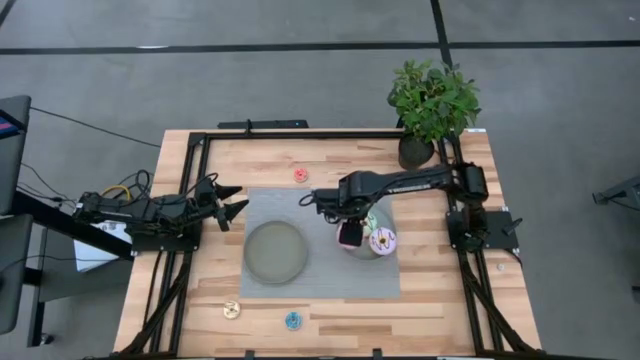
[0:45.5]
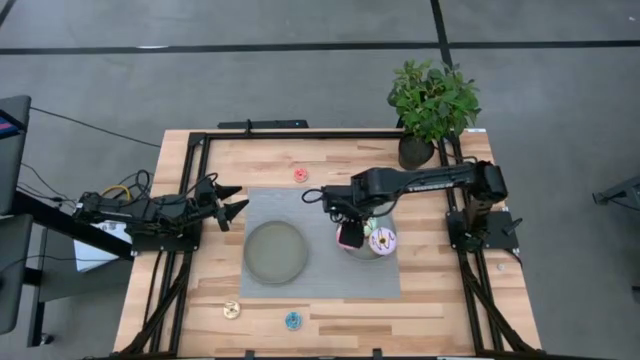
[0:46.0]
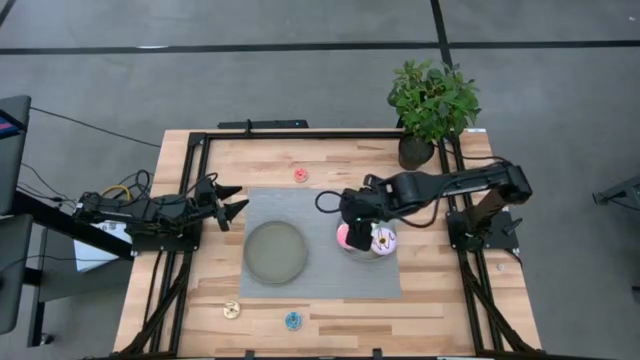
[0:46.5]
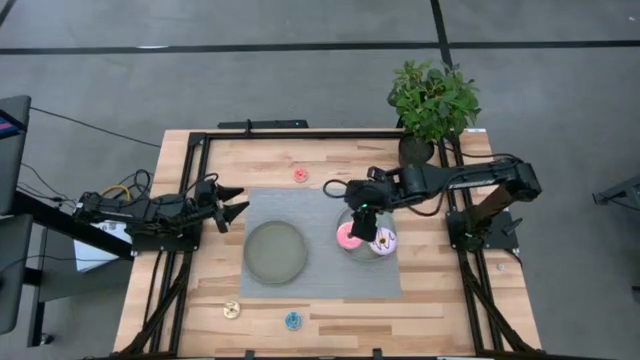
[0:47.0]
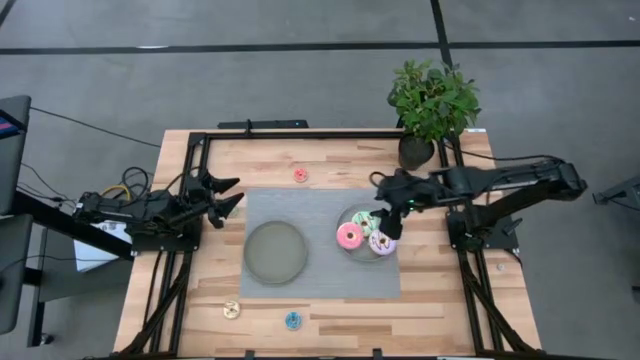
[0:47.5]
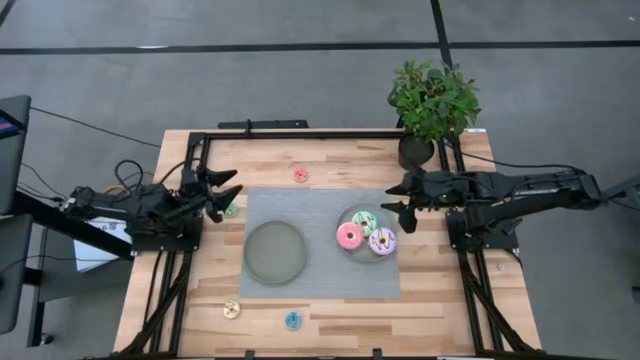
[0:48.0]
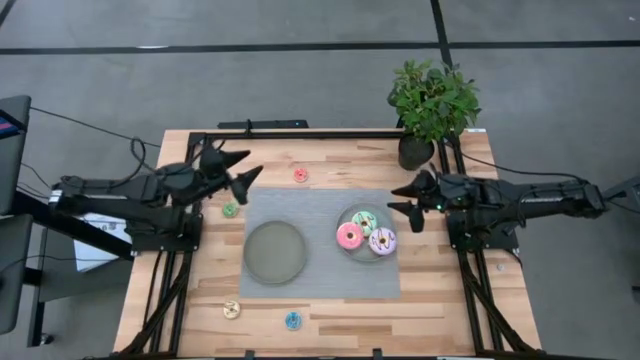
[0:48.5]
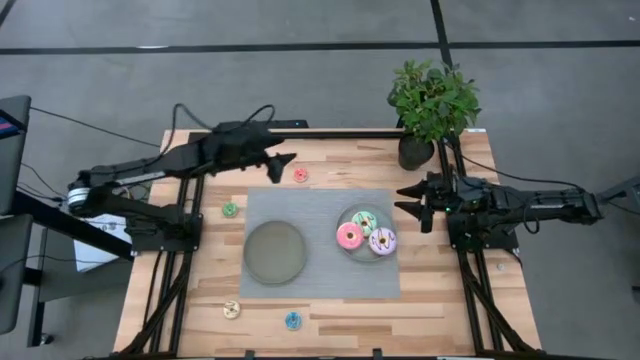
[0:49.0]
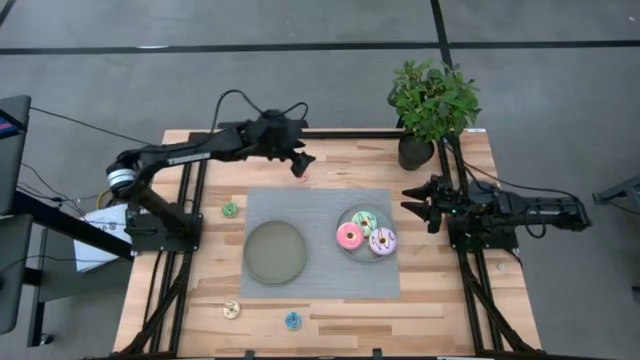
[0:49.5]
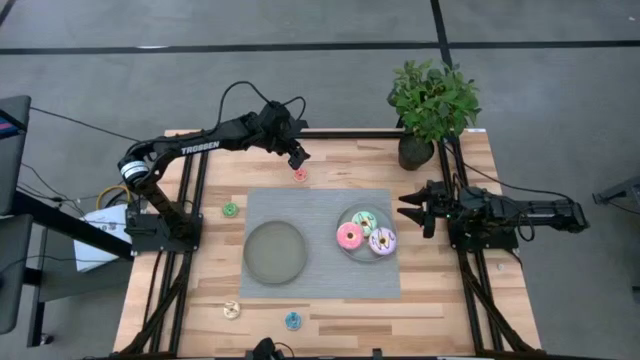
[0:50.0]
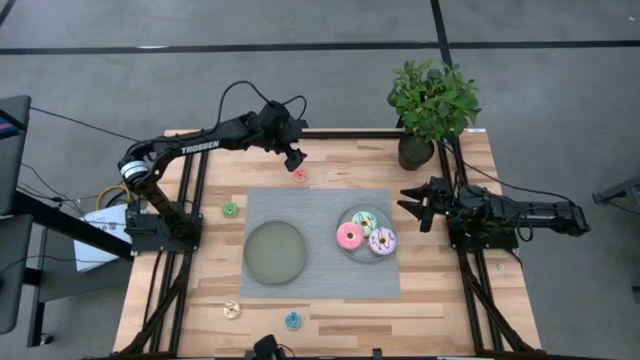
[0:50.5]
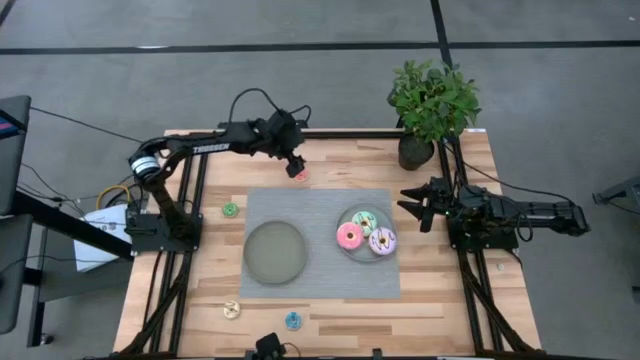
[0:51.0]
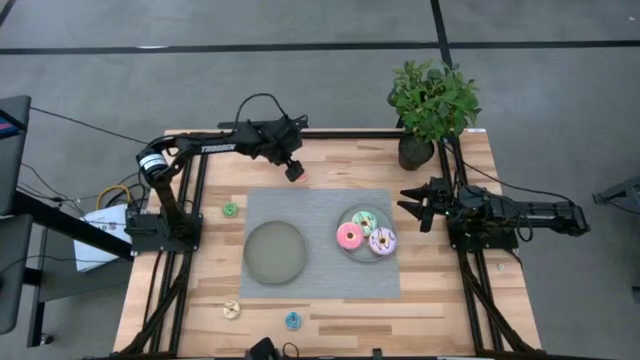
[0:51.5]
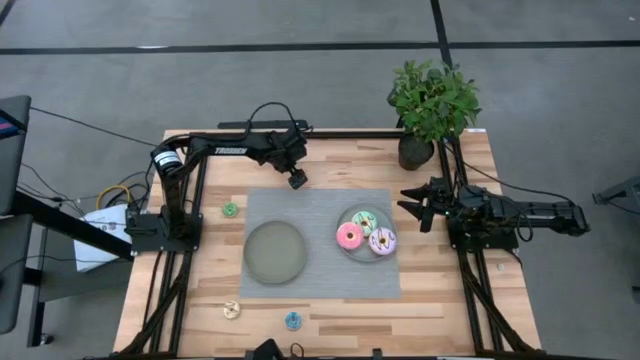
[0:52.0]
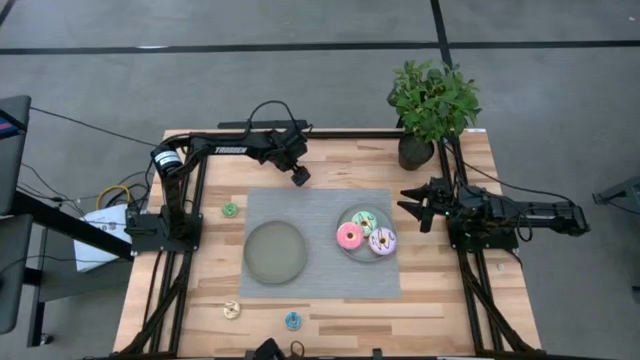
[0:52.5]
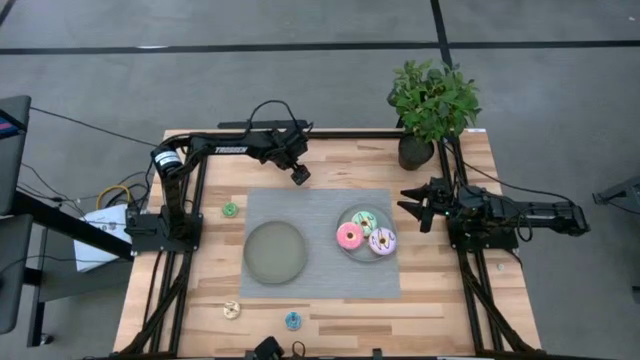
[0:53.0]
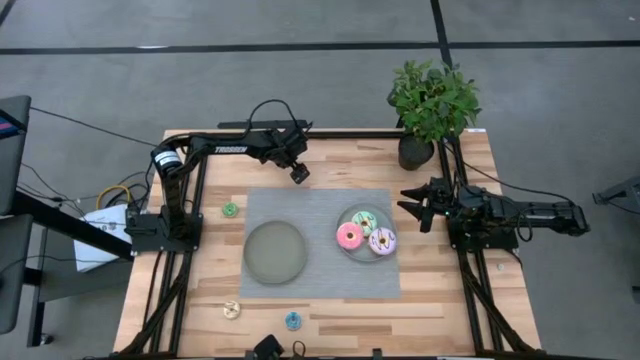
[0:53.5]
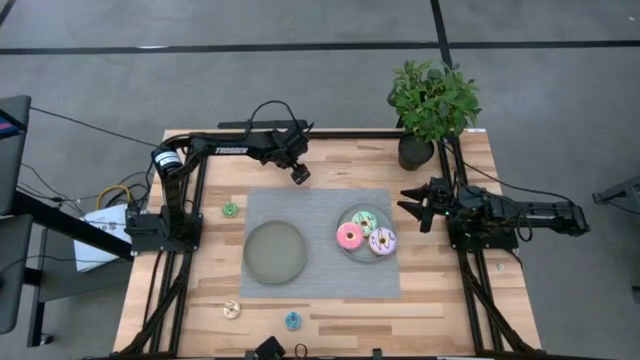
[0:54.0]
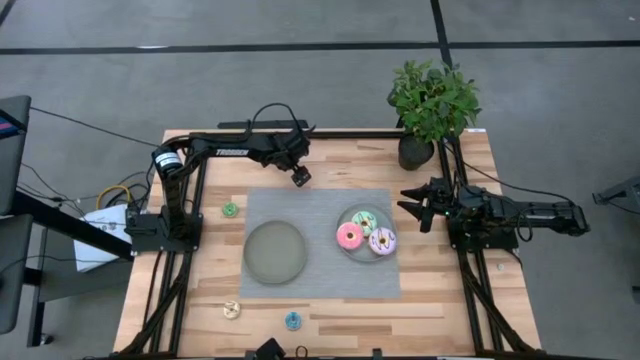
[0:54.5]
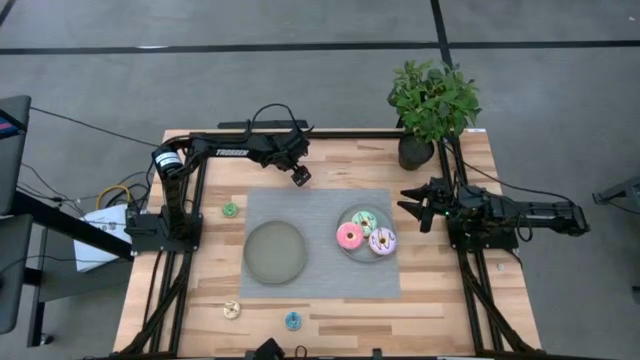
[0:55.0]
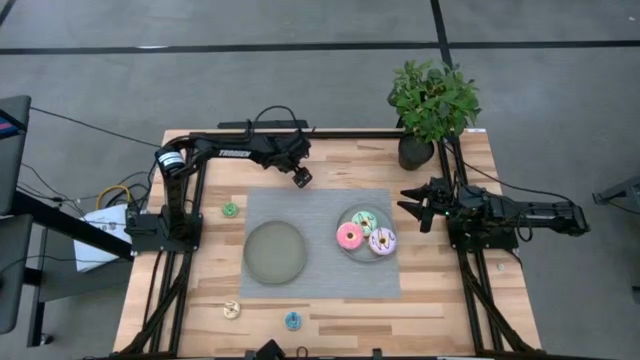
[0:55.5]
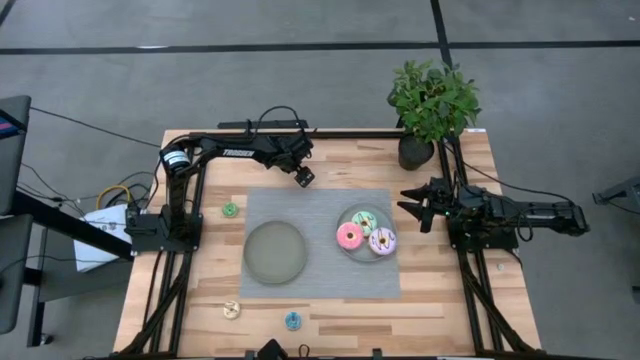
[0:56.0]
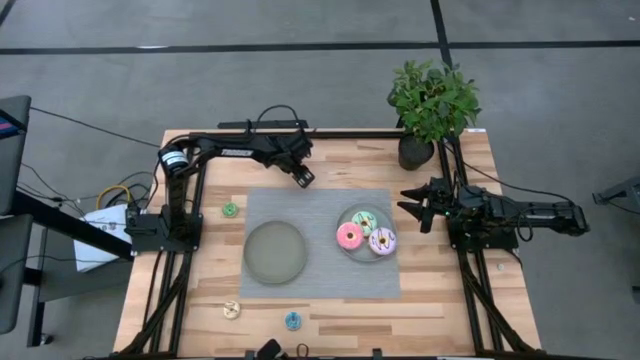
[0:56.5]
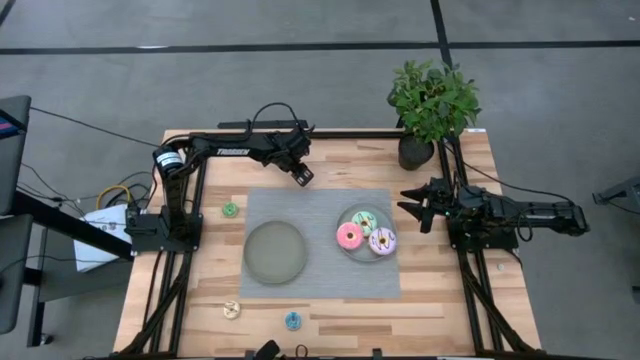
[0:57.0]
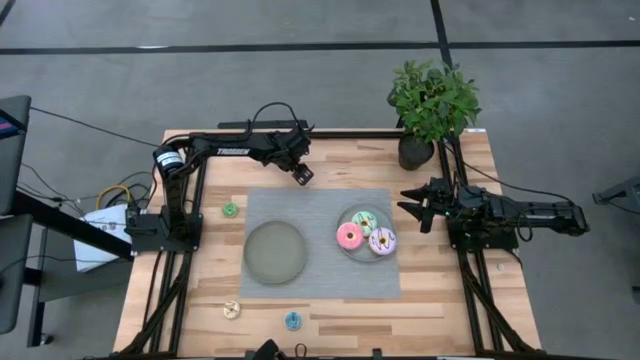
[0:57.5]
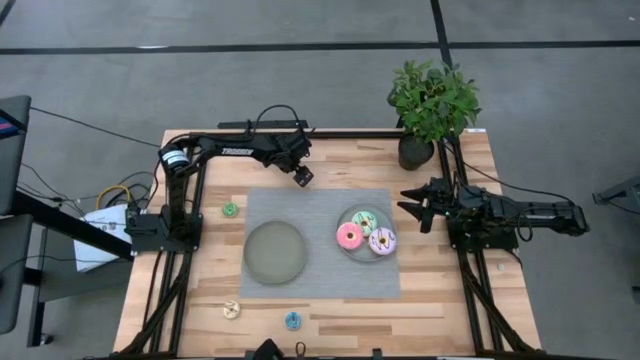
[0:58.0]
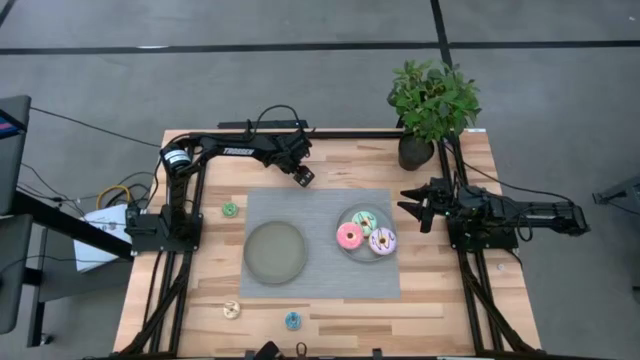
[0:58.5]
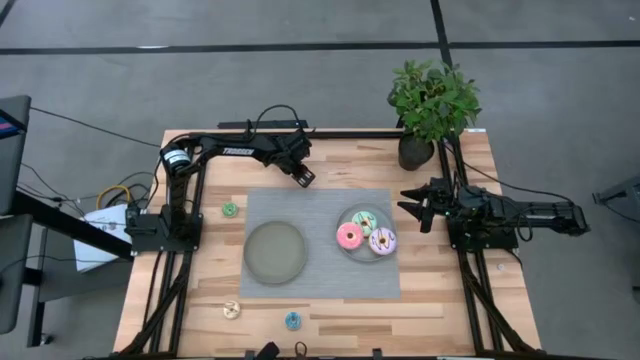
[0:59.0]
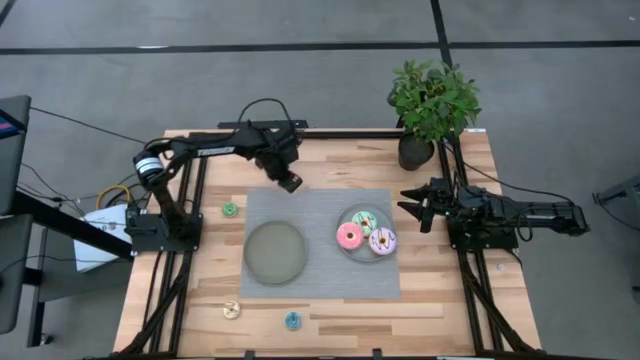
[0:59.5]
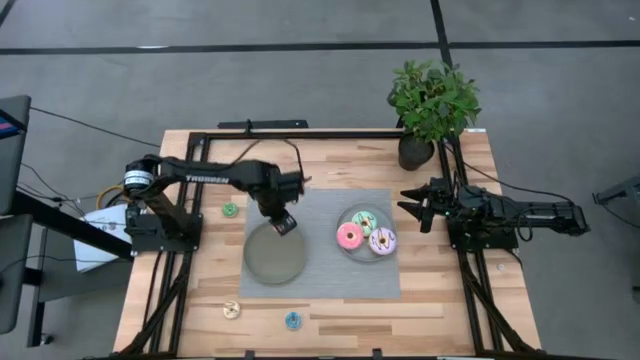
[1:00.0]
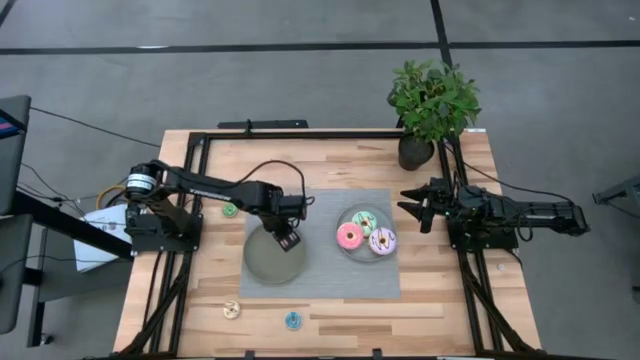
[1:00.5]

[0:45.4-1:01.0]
Task: Pick & Place donuts
Put the small red donut on the brown plate
